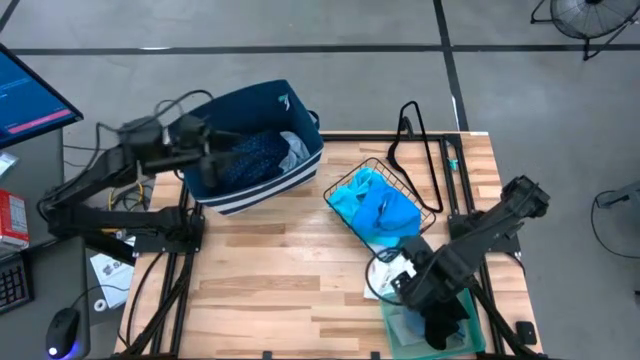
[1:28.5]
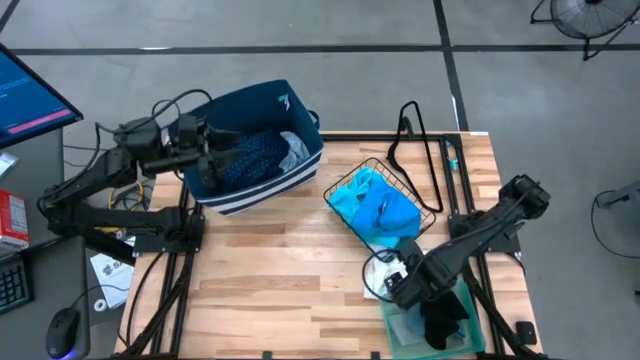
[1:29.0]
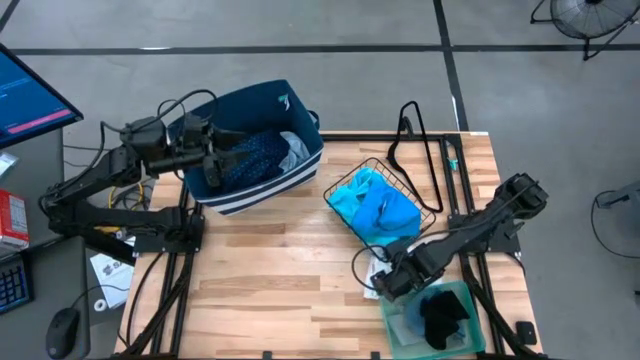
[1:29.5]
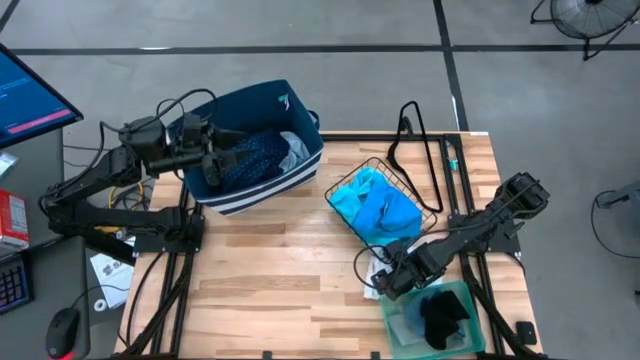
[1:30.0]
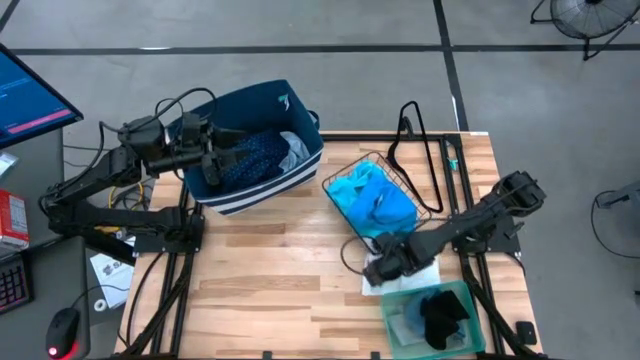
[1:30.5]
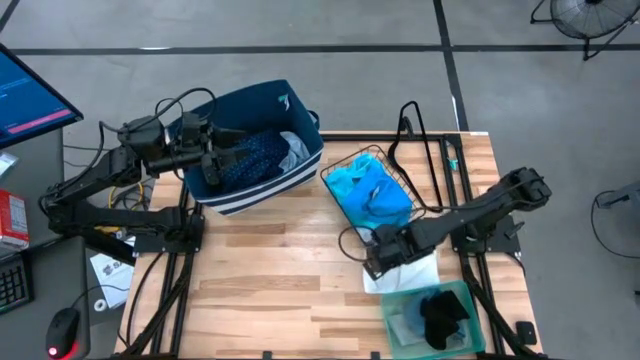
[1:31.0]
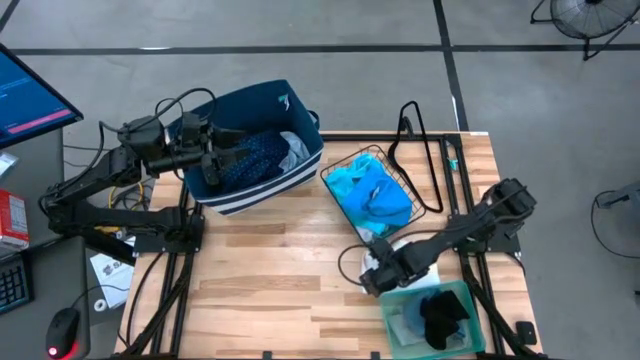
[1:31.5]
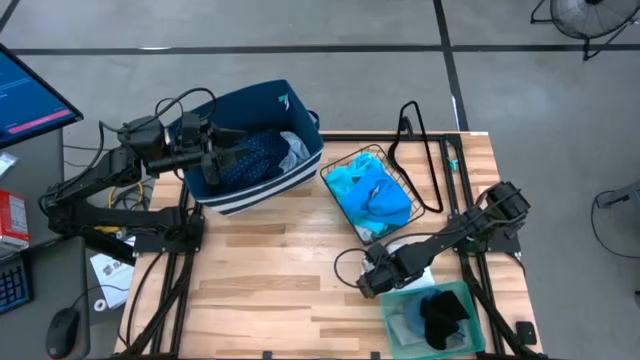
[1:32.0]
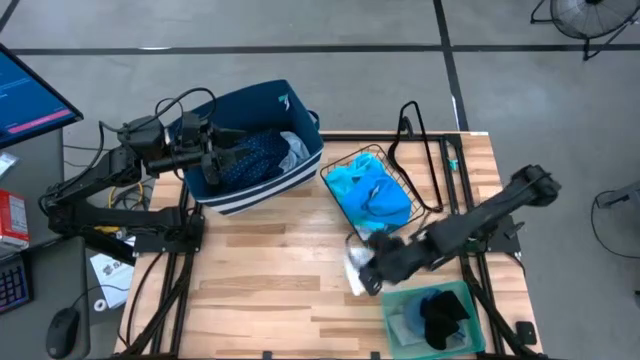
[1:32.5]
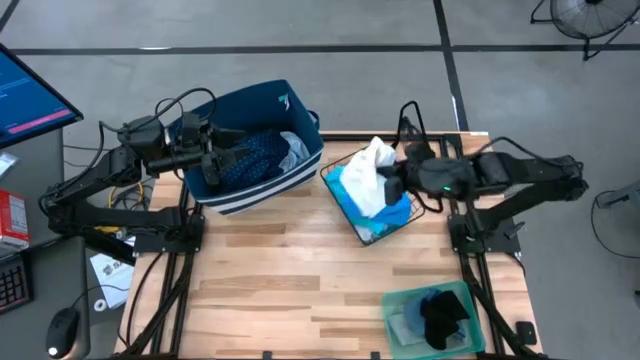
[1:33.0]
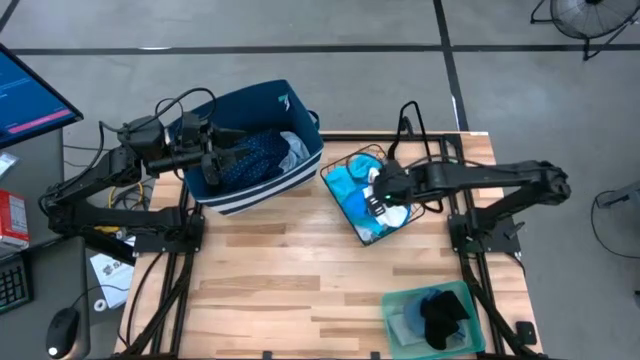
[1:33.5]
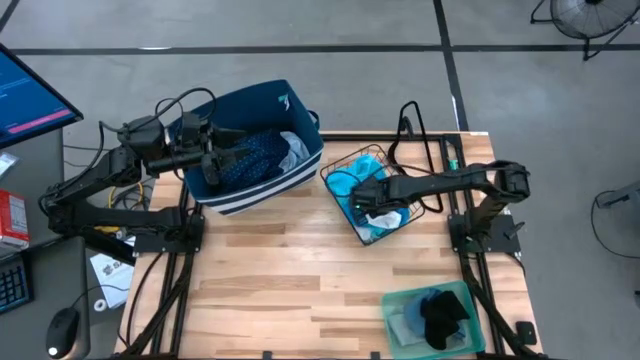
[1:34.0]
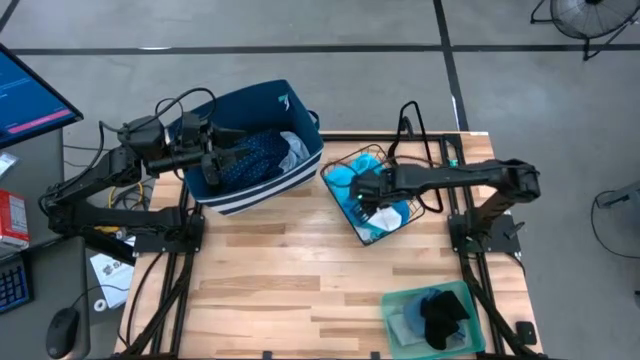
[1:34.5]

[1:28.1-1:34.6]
Task: Pick & Place Cloths
Put the white shorts into the wire basket

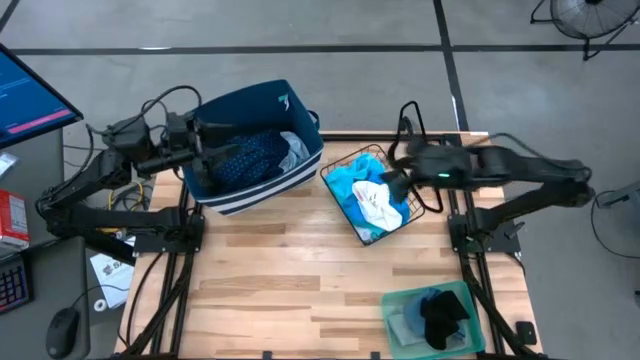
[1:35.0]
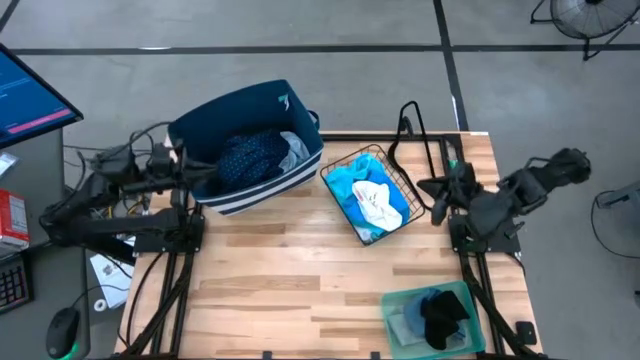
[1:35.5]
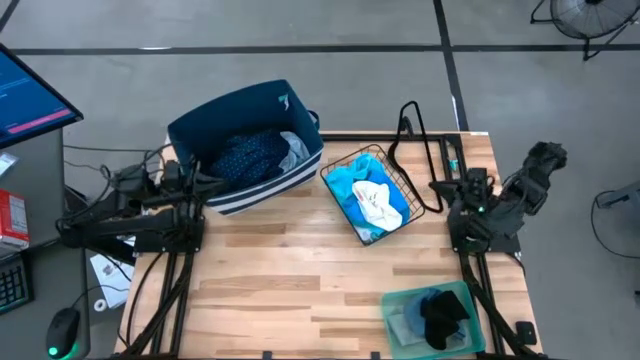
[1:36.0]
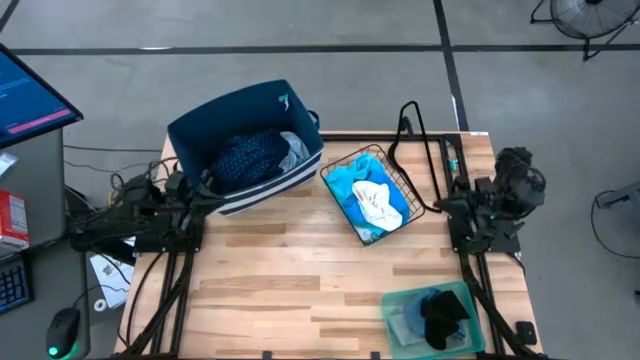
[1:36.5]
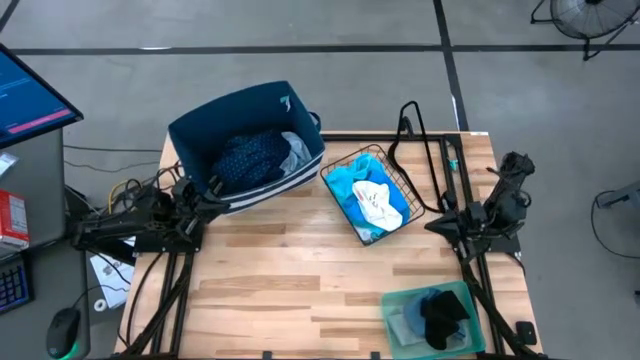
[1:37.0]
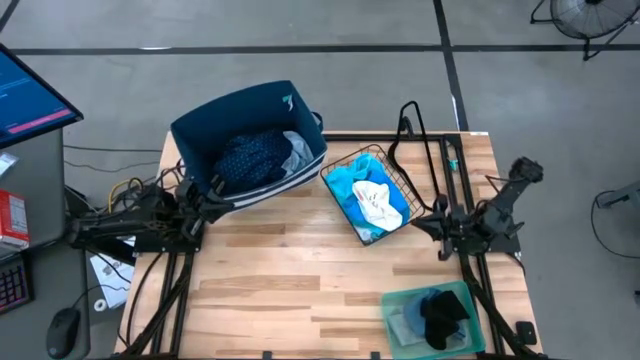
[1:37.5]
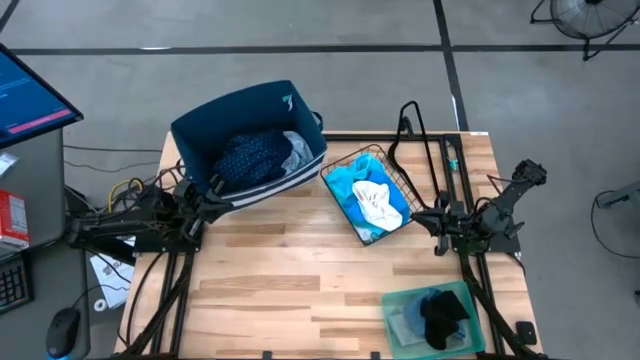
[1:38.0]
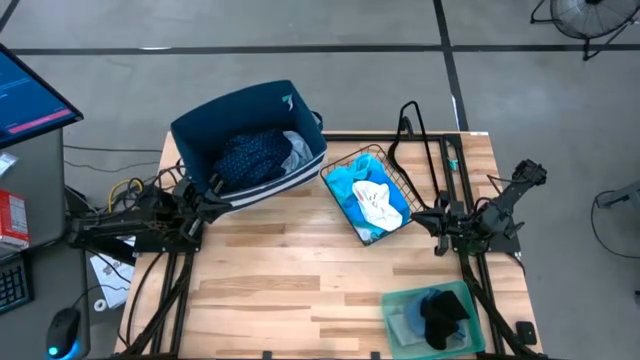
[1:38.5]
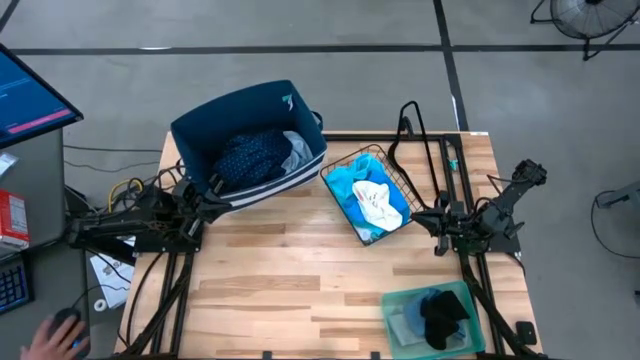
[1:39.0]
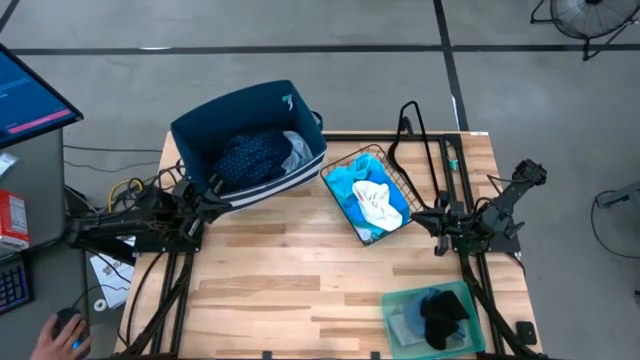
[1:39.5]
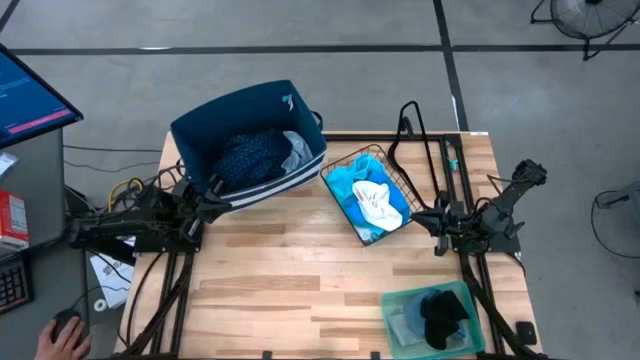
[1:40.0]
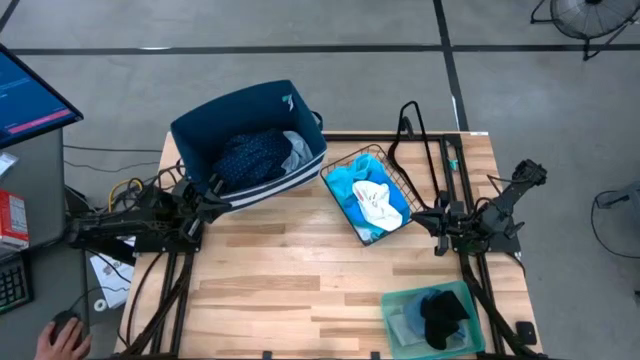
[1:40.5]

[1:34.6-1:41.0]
Return to Home Position

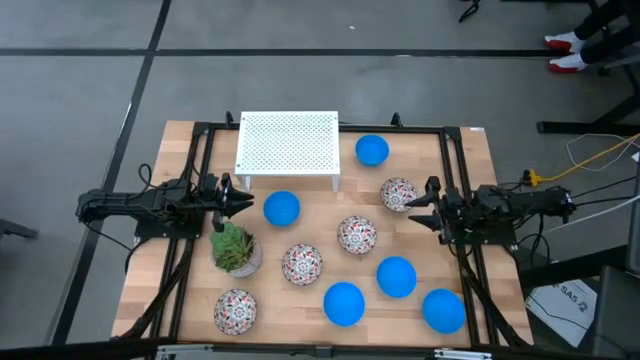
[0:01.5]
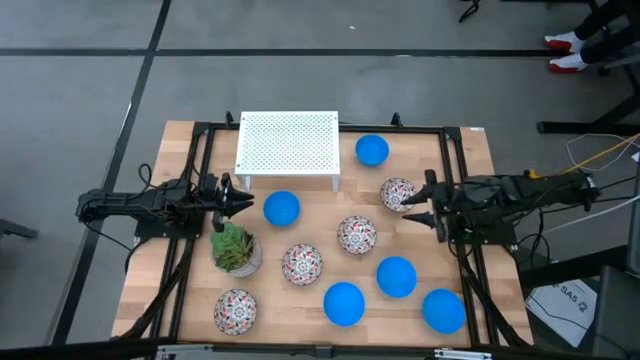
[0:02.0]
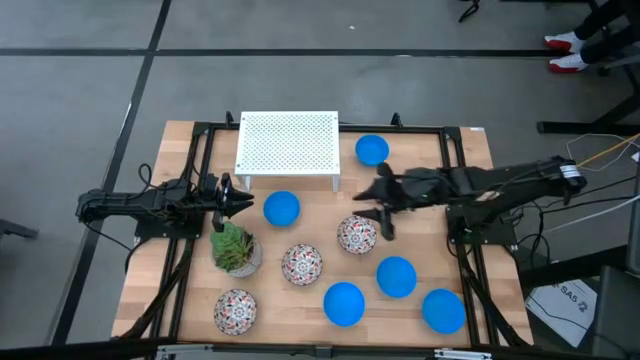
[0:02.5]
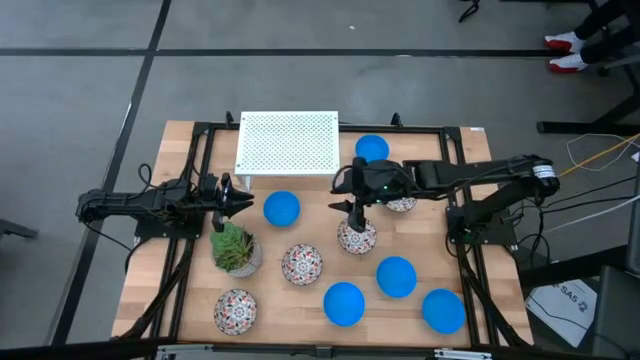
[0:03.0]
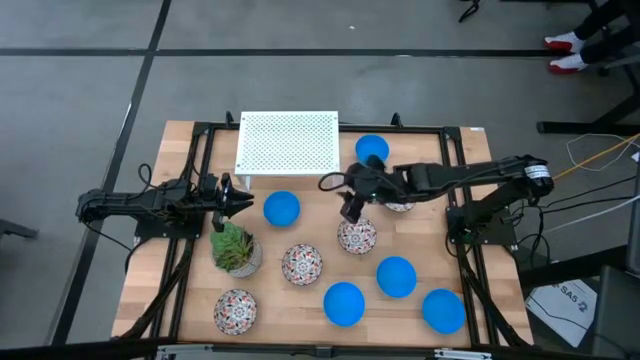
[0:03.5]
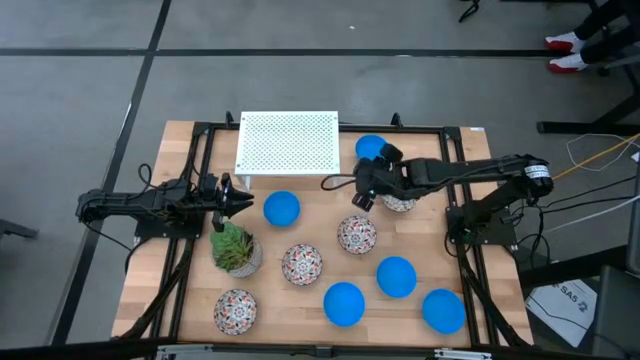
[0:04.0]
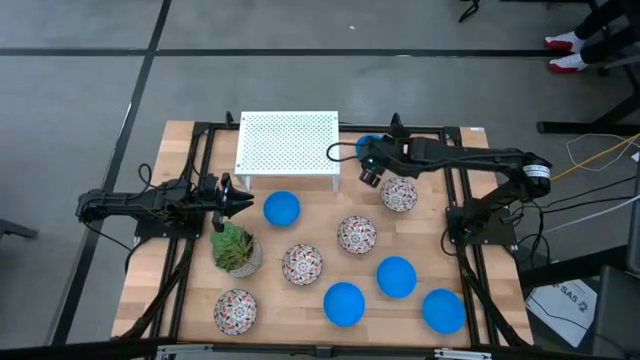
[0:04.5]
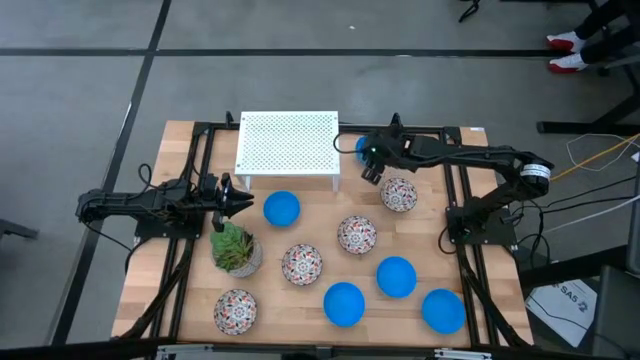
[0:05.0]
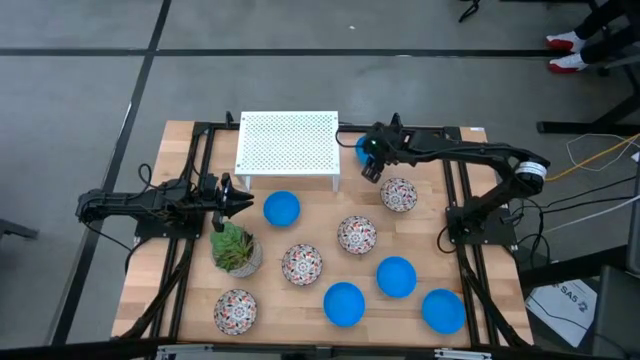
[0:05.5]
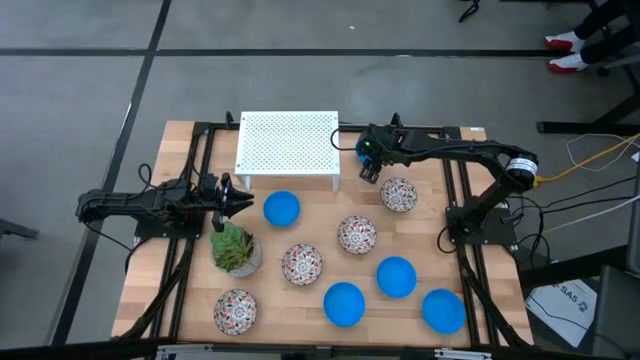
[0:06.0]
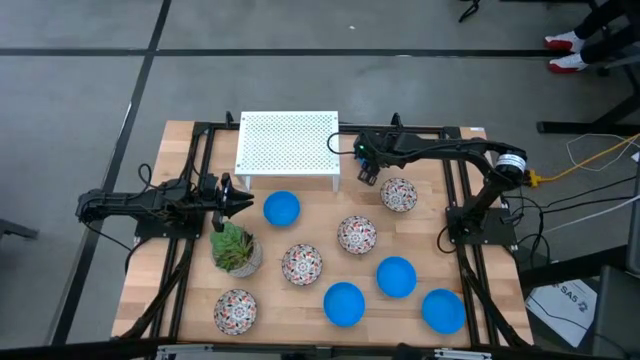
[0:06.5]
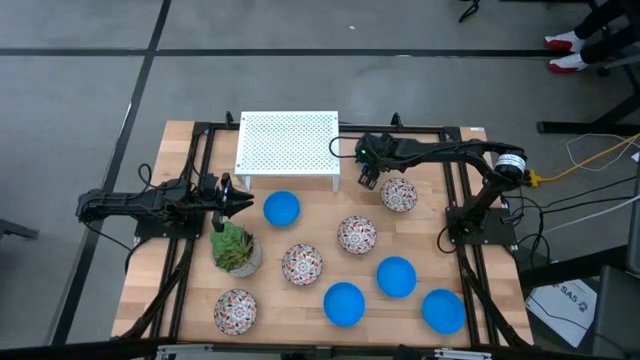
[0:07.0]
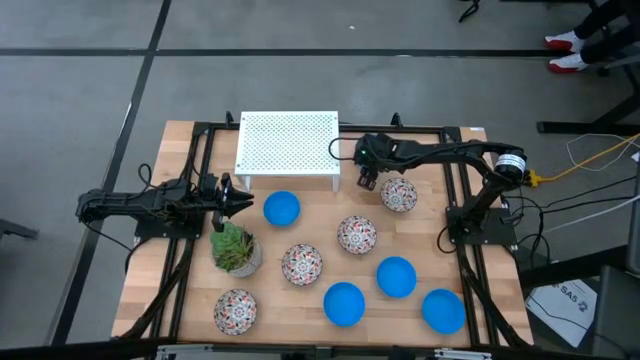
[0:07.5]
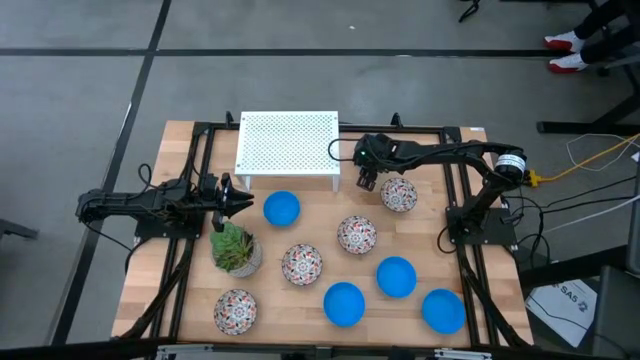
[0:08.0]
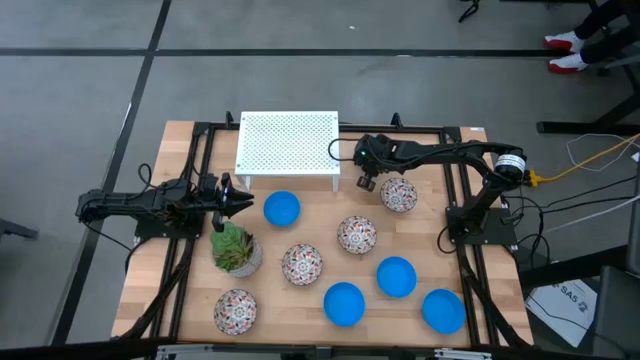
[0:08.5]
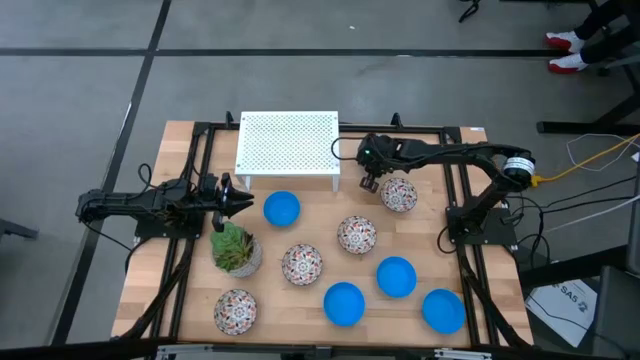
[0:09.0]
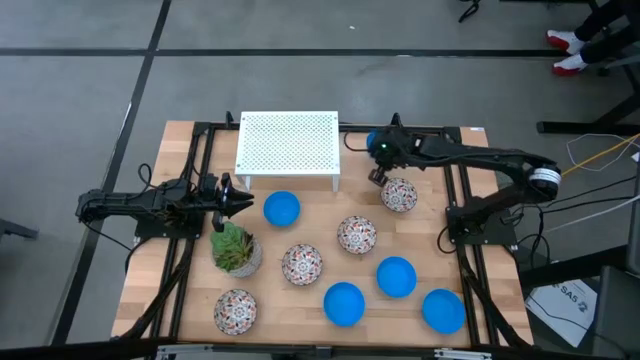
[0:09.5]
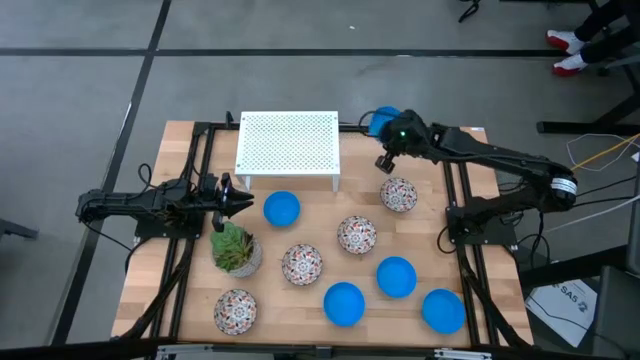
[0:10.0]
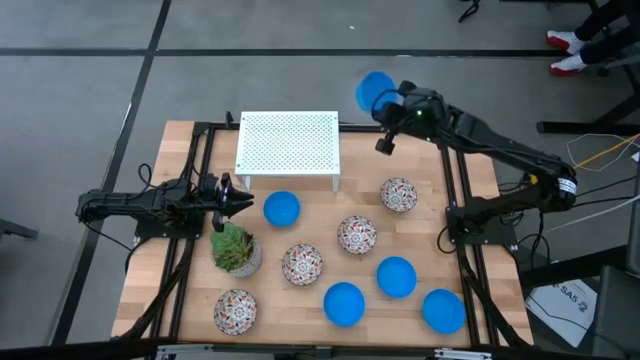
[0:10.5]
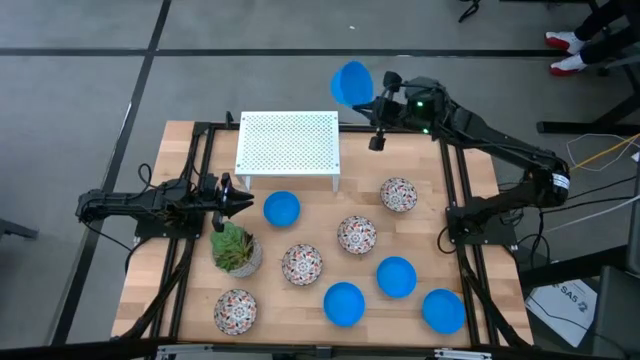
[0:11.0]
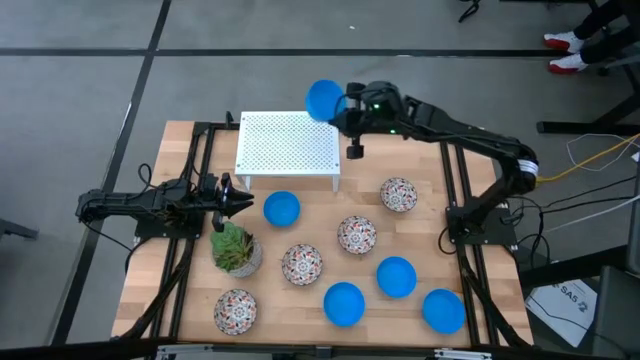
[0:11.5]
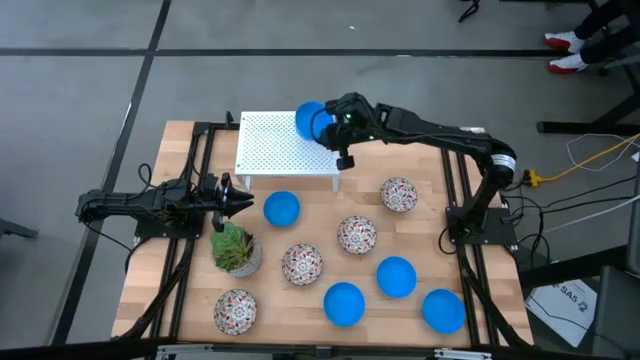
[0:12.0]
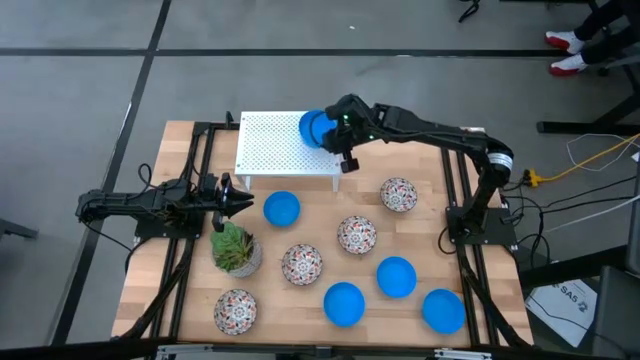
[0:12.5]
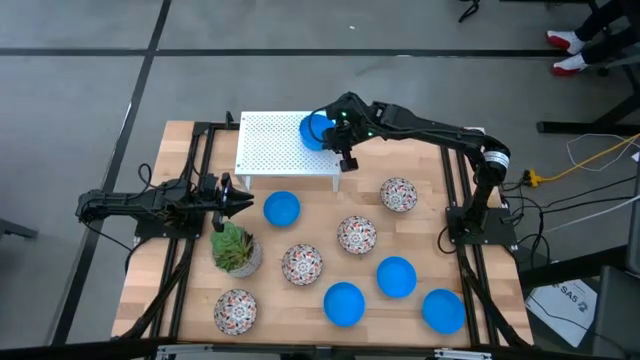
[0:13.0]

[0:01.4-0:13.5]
Task: Pick & Place Mini bowls
Put the blue bowl on the shelf
